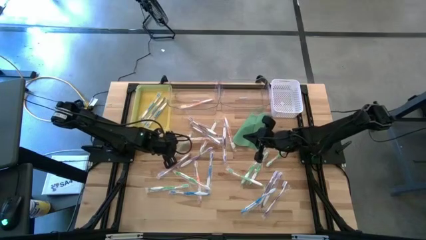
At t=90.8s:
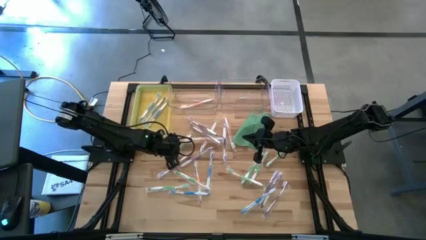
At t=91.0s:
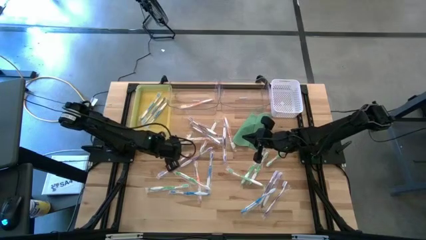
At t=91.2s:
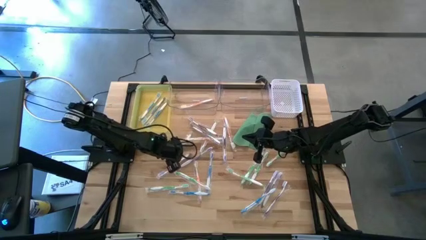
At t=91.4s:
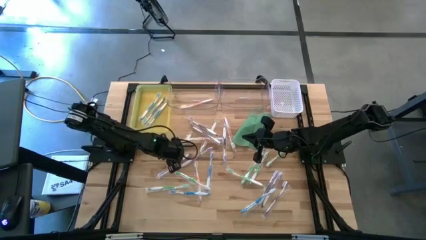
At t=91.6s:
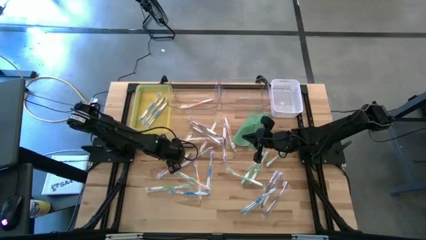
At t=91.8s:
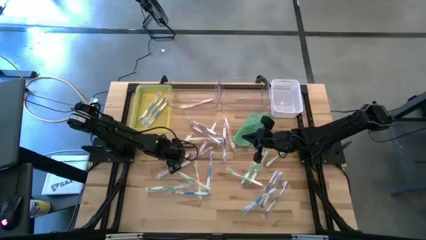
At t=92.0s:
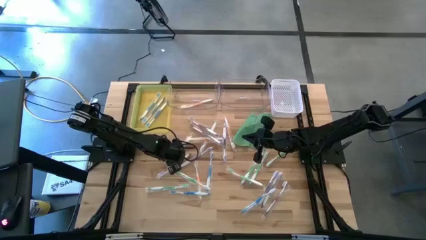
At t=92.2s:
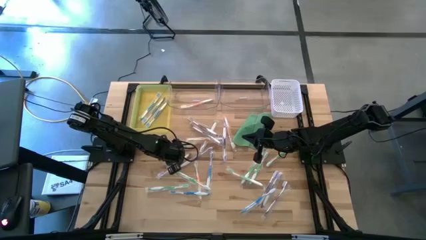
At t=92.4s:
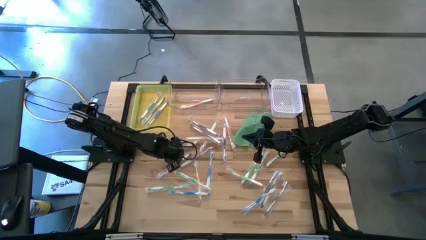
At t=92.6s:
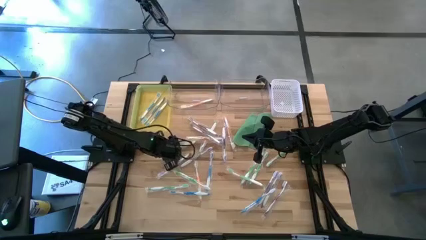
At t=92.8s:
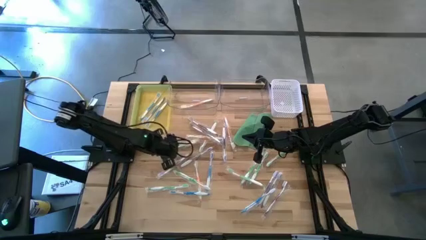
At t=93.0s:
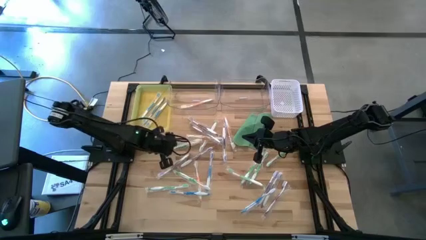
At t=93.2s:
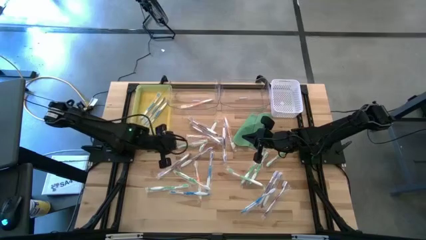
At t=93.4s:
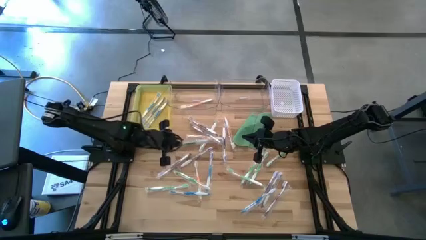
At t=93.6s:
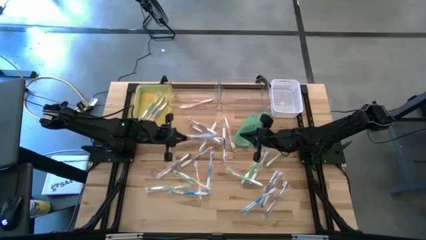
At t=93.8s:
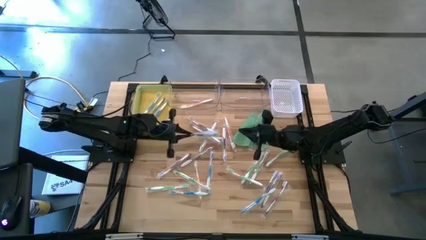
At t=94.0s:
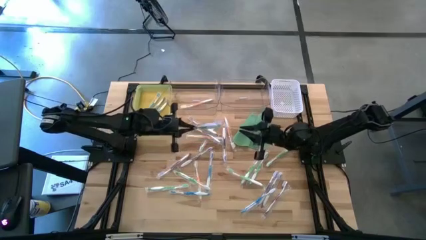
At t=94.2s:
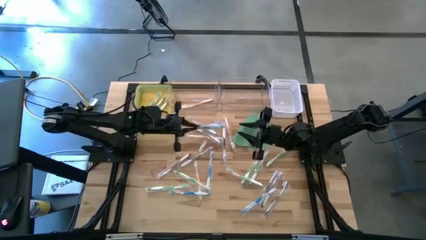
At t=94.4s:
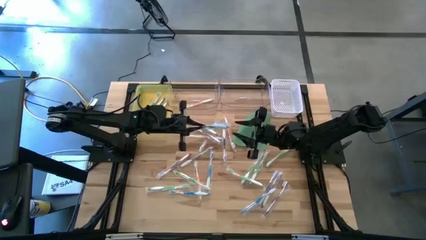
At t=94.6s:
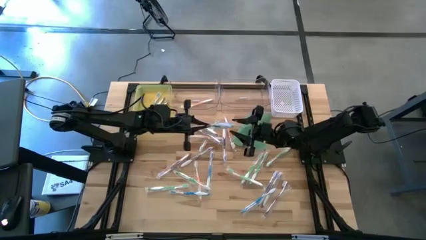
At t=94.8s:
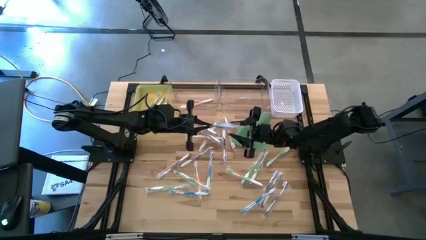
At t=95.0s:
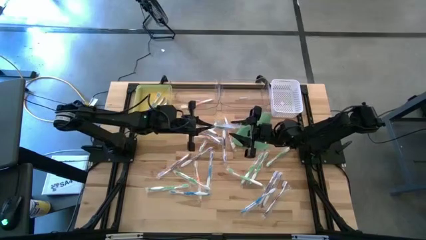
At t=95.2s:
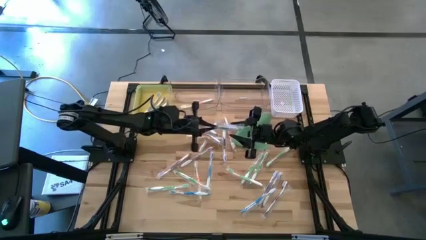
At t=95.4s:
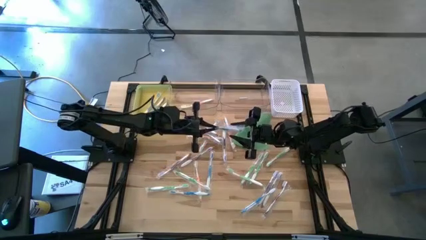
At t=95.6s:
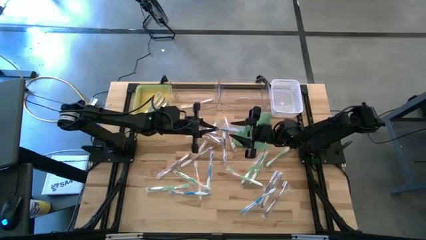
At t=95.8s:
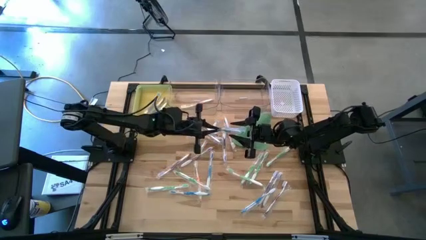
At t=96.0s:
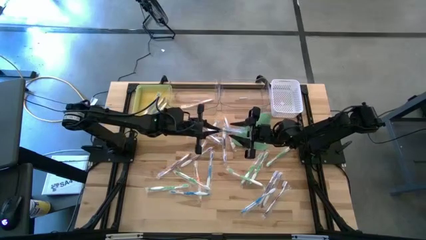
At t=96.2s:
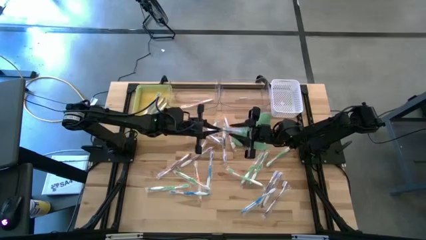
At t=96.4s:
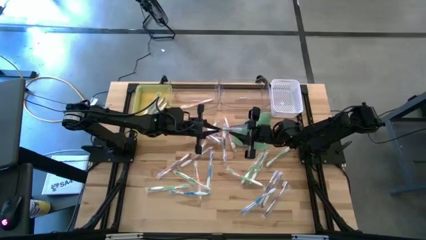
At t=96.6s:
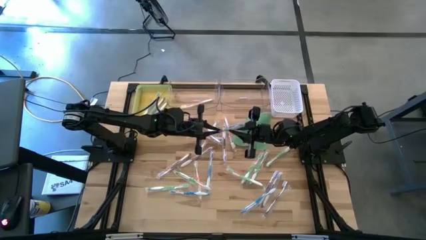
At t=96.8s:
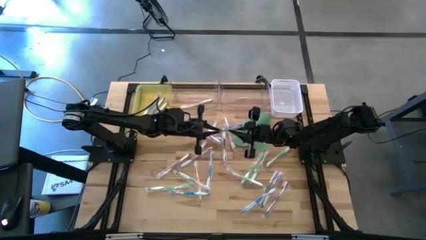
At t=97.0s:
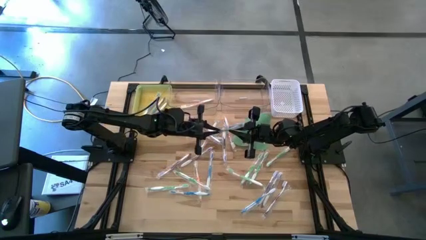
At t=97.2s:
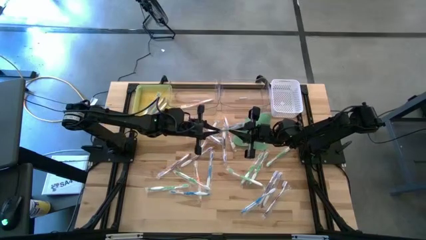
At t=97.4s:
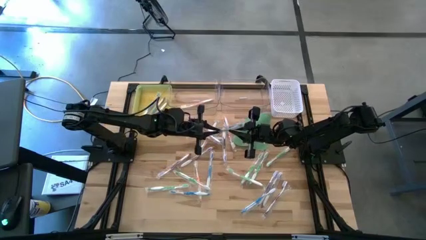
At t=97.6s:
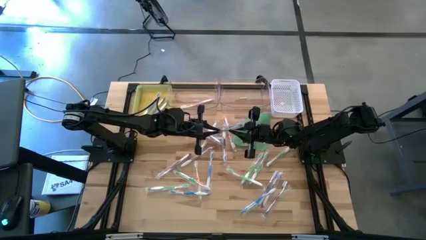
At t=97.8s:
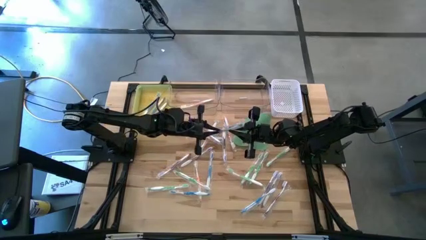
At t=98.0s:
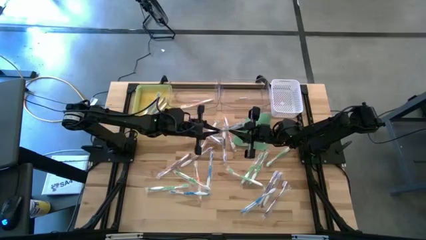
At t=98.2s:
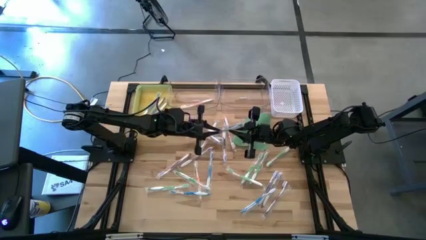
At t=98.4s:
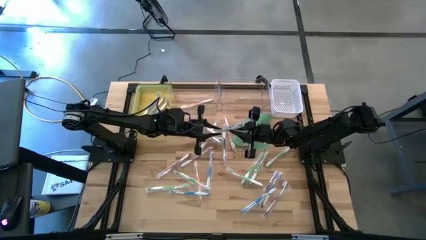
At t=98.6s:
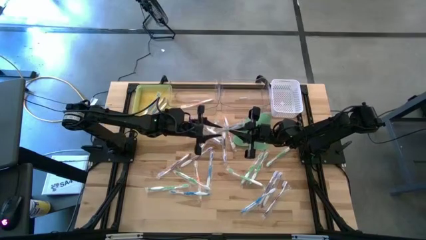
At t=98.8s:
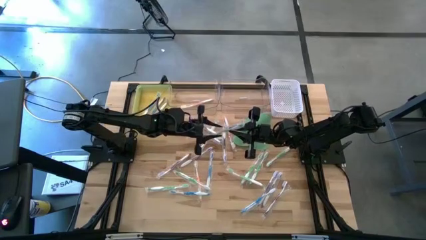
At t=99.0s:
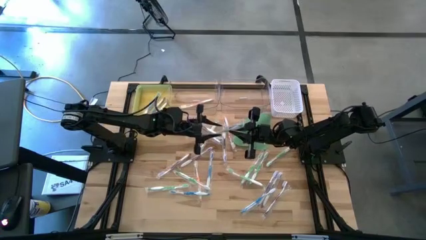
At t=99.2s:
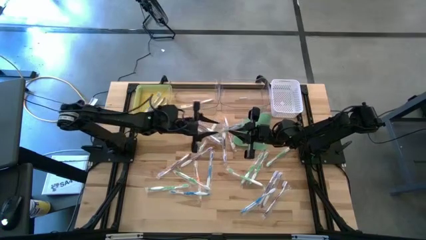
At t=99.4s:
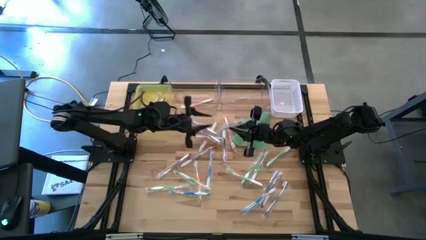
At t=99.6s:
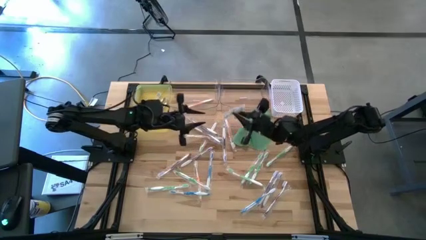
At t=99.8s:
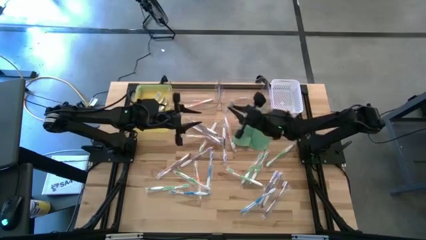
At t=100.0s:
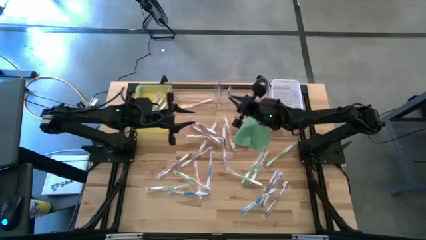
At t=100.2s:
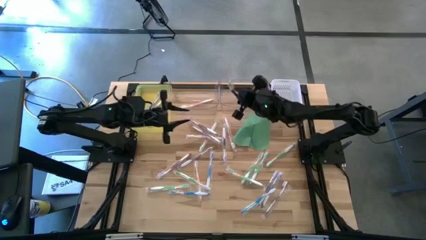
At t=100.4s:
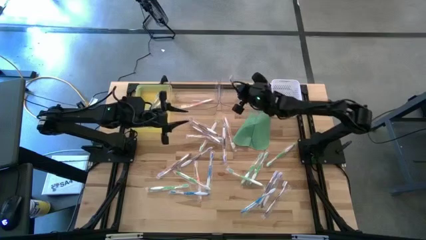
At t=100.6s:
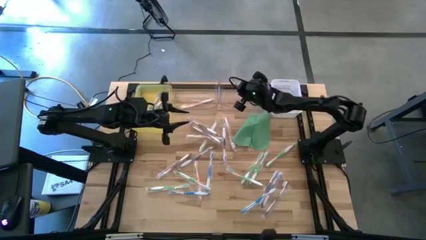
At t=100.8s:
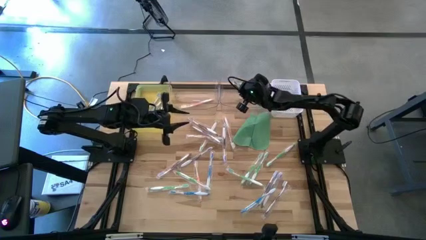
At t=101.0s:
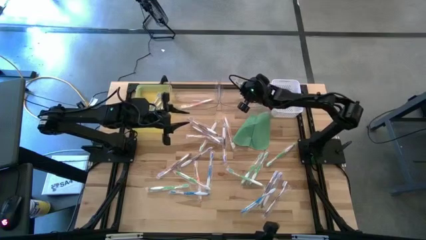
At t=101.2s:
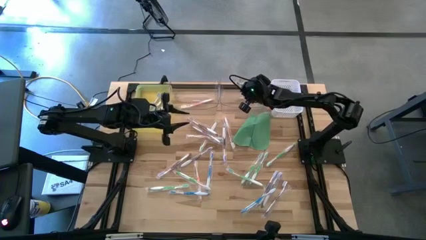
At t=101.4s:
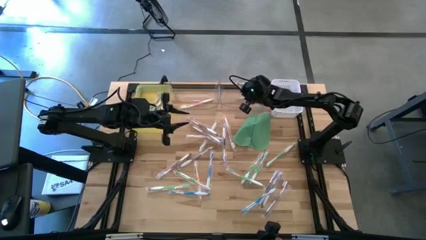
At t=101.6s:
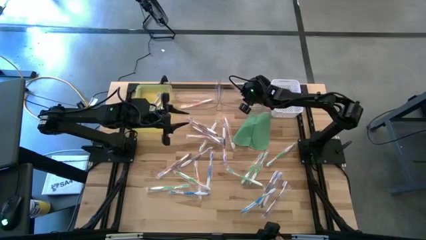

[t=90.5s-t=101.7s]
Task: Pick & Place Toothbrushes
Put the green toothbrush into the right transparent bin
